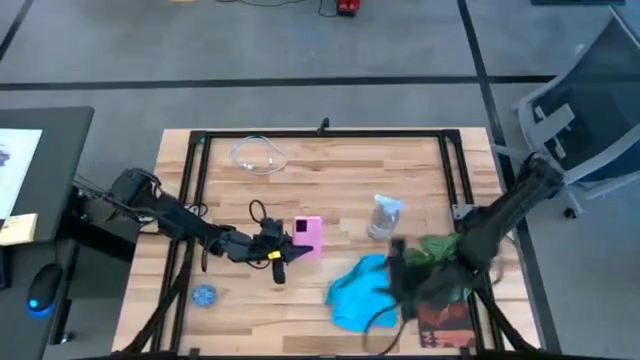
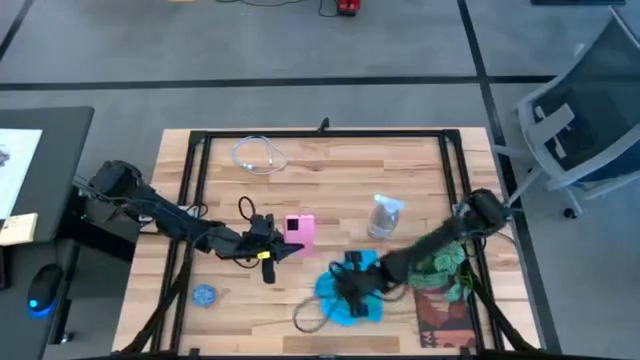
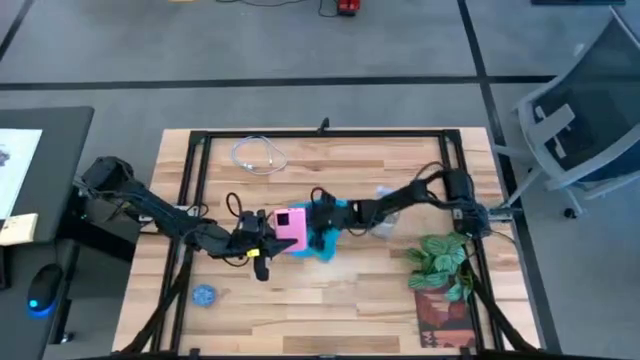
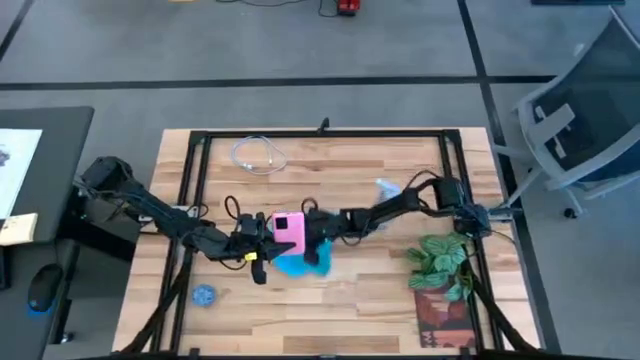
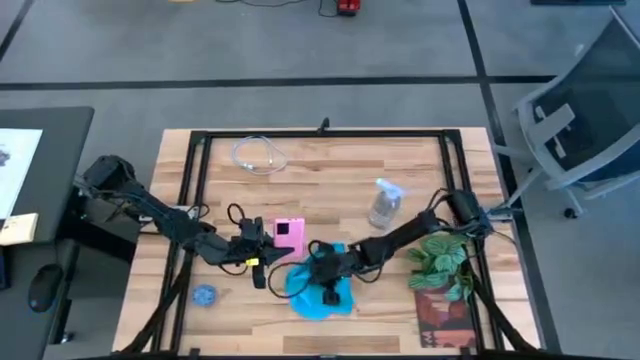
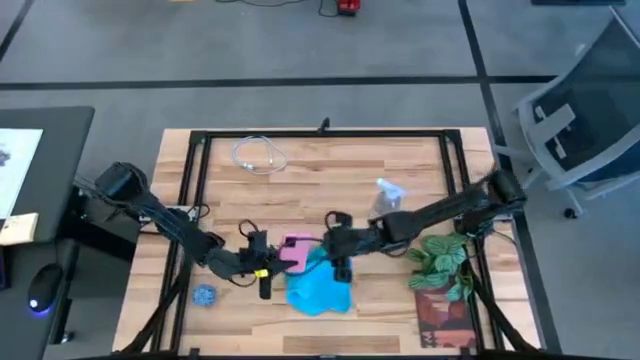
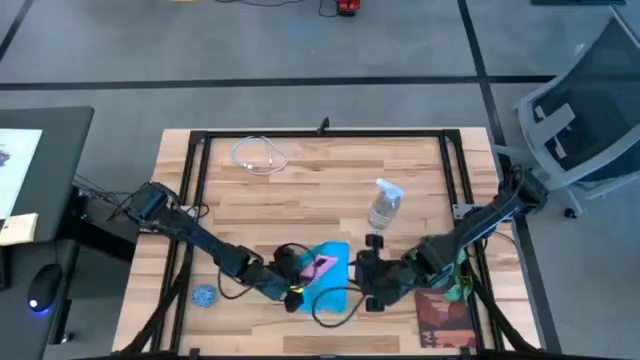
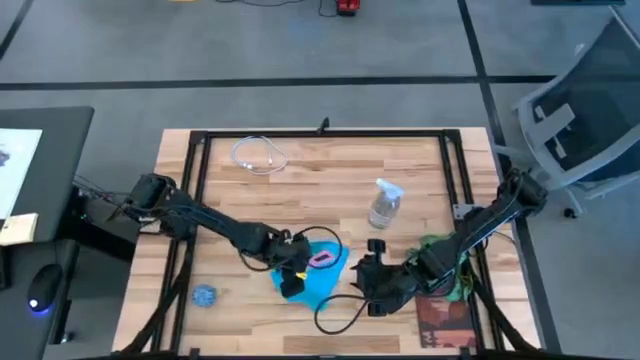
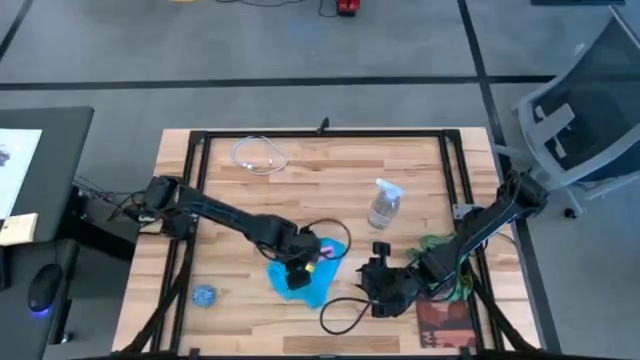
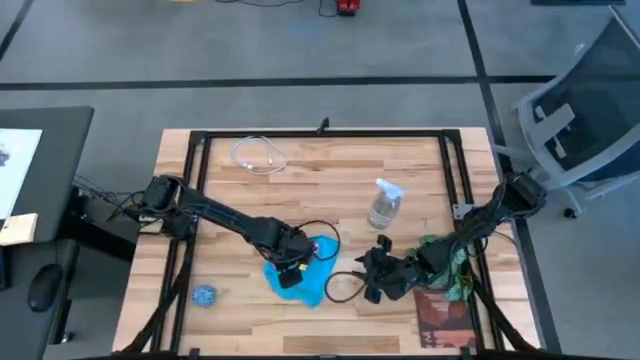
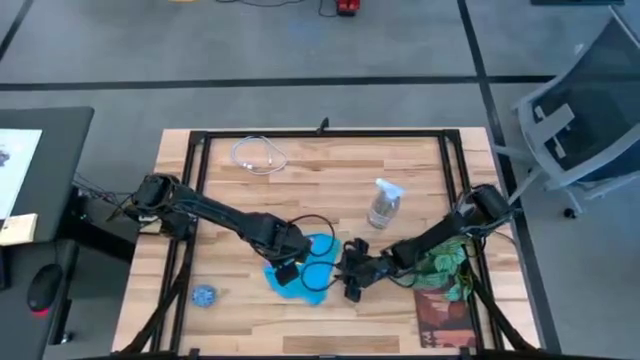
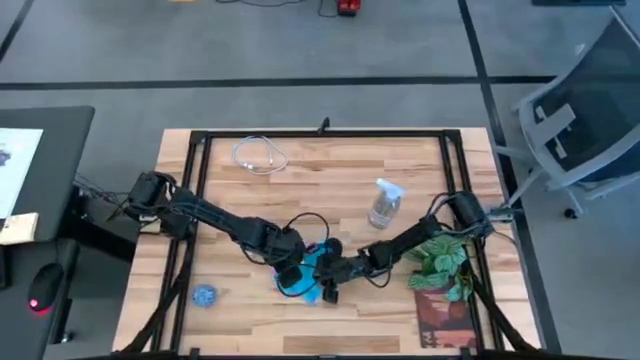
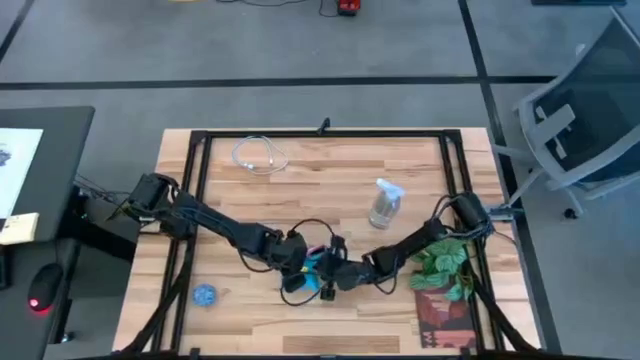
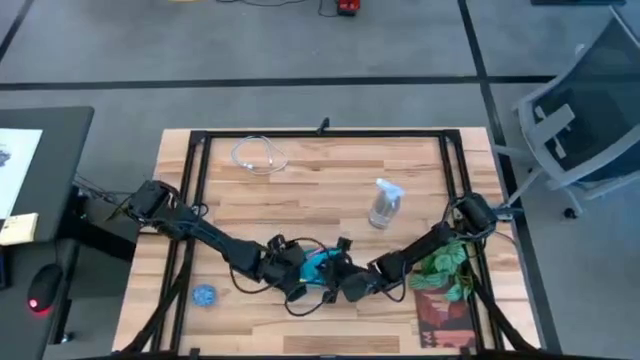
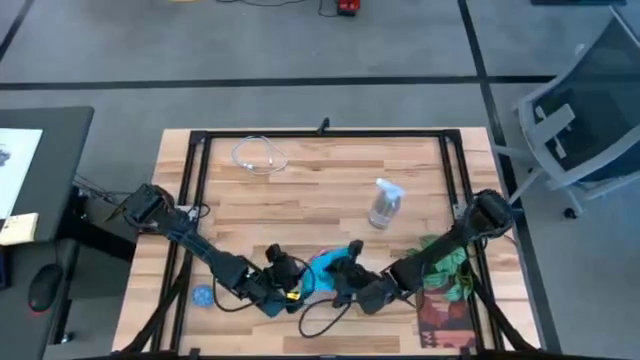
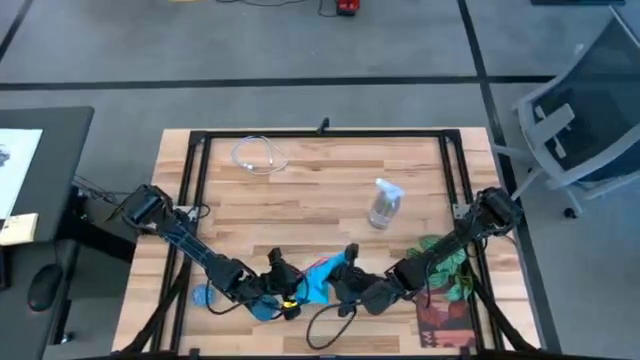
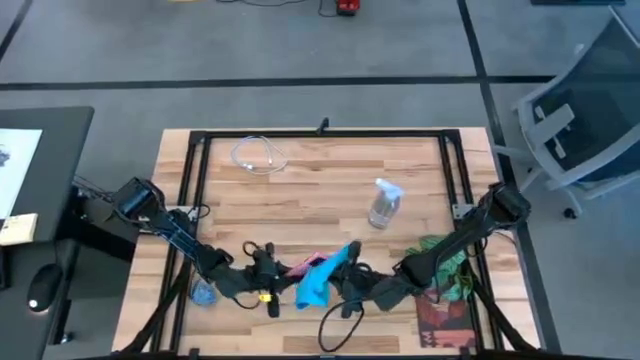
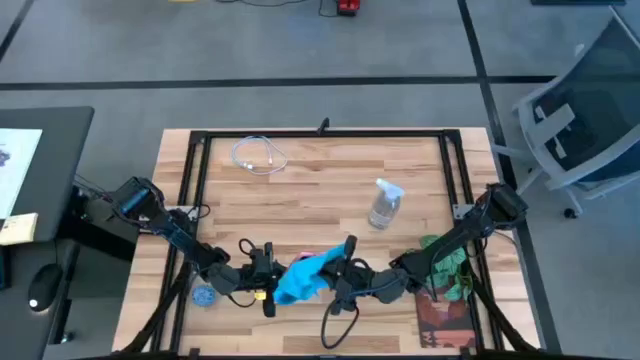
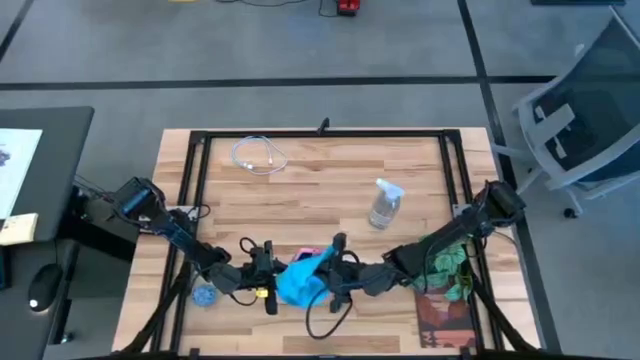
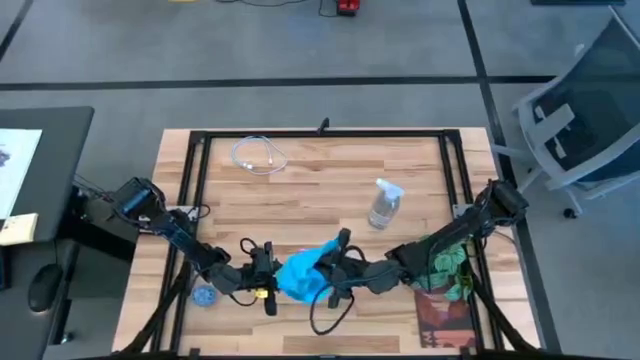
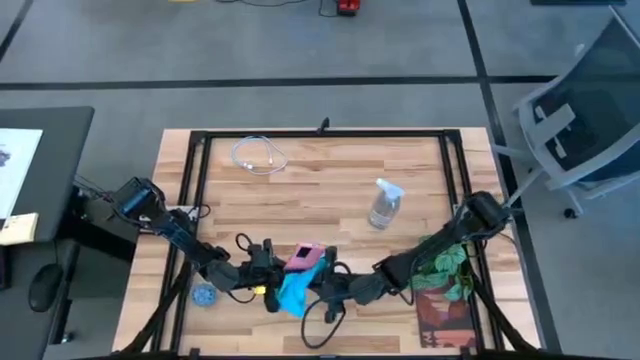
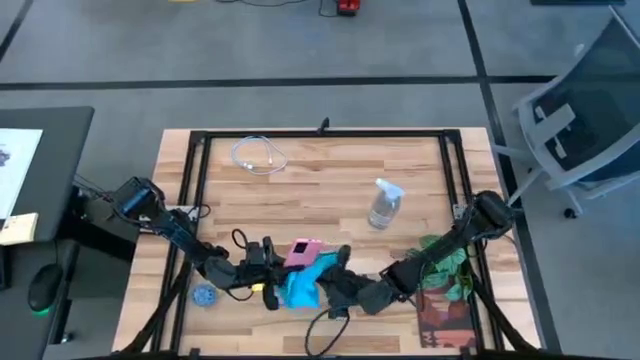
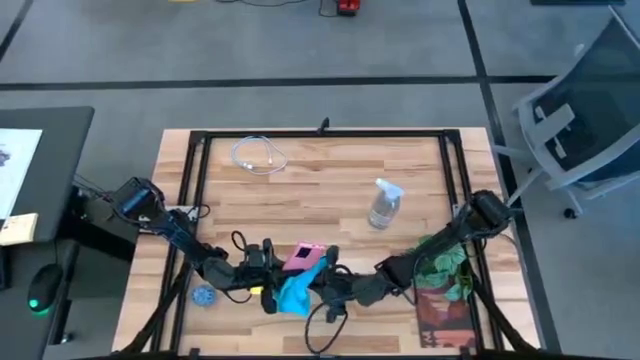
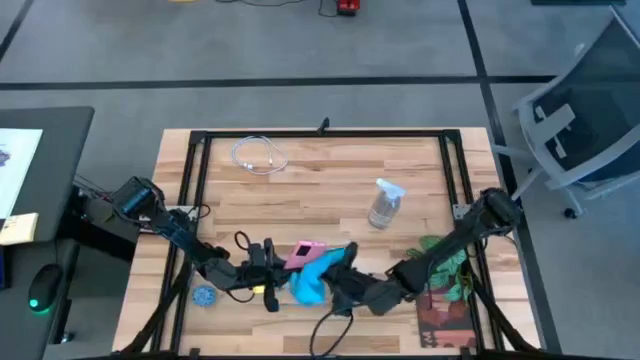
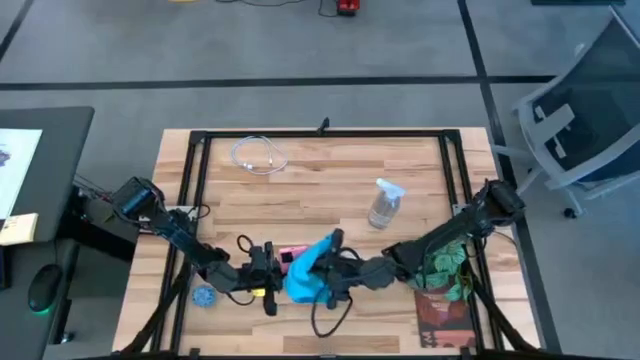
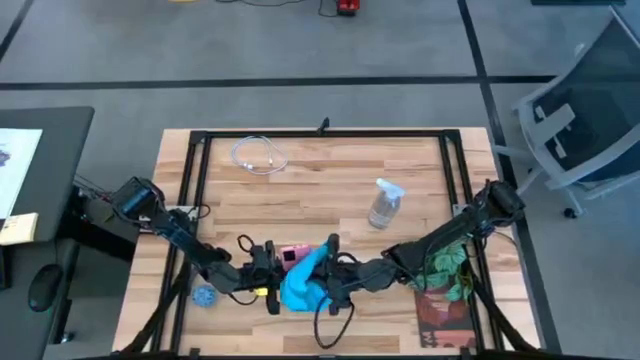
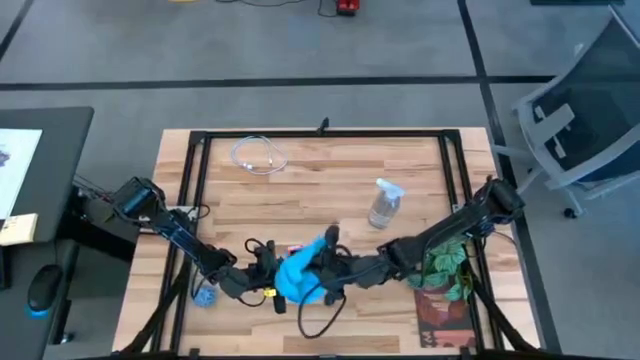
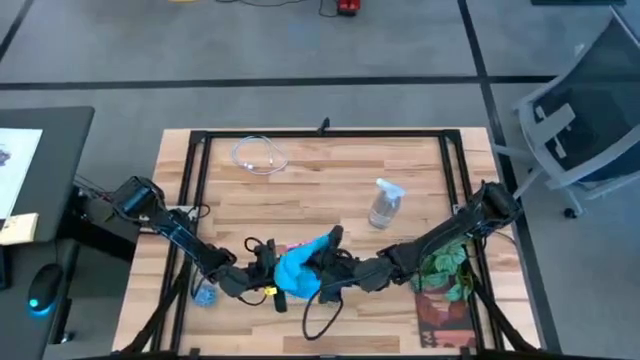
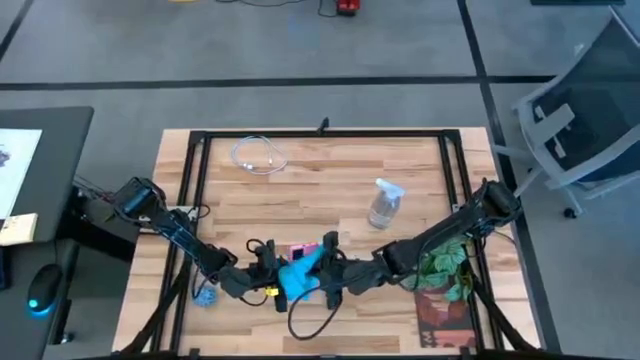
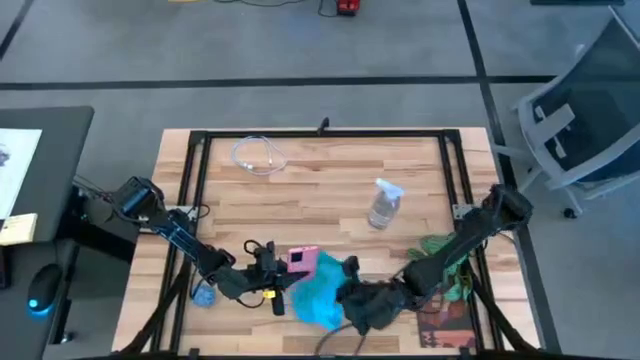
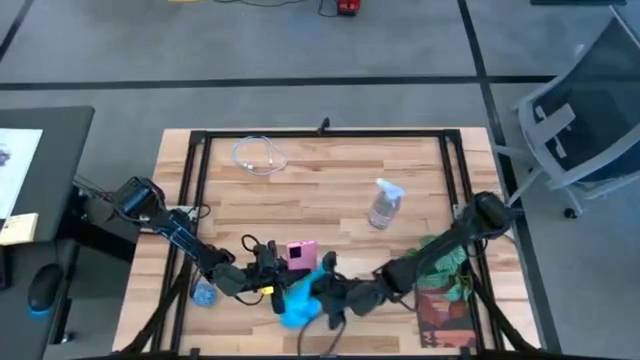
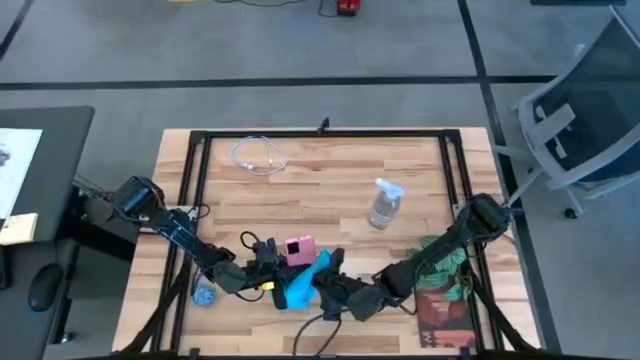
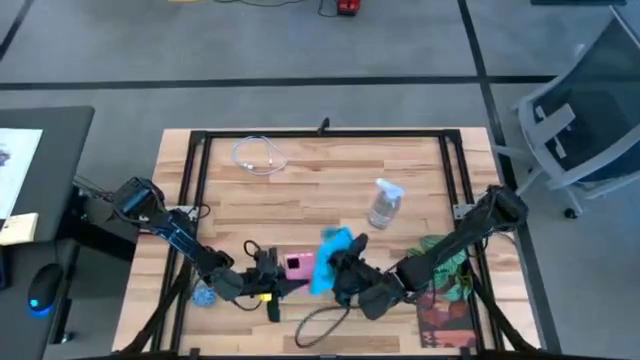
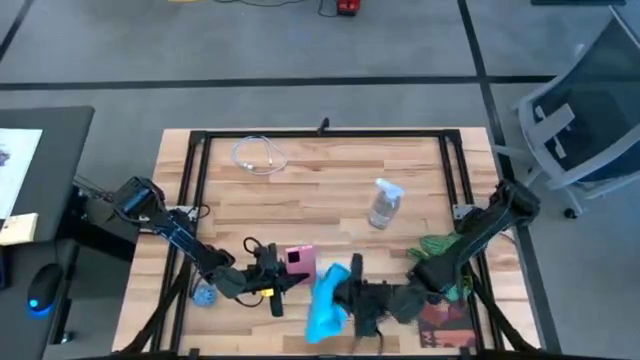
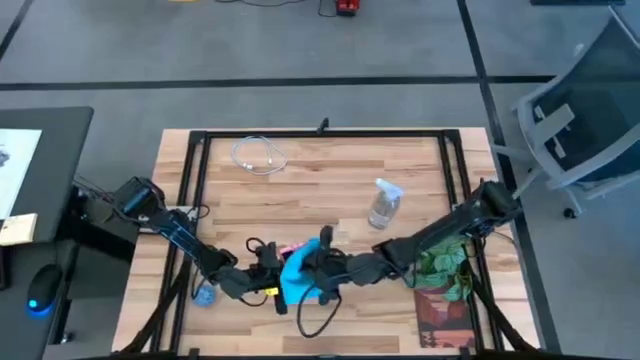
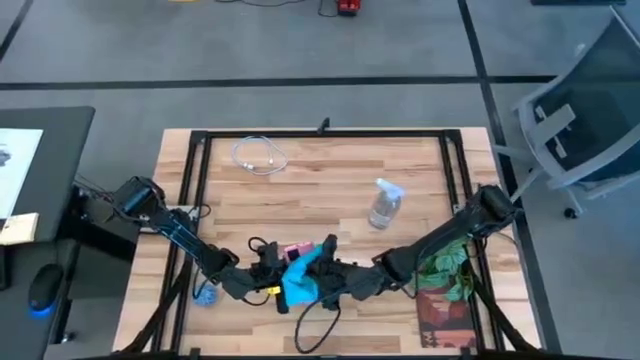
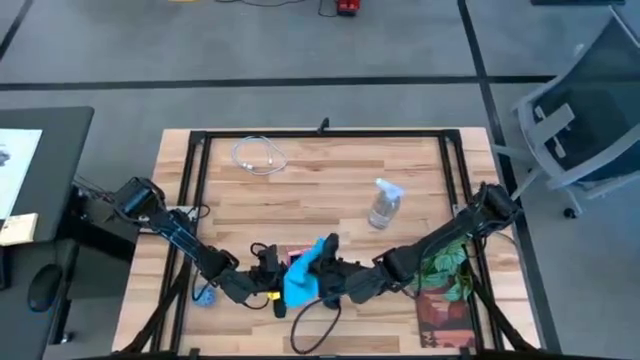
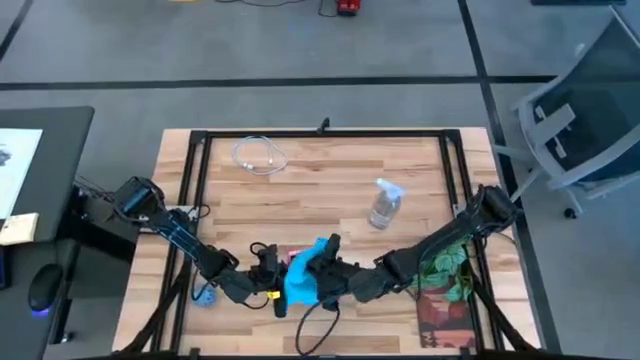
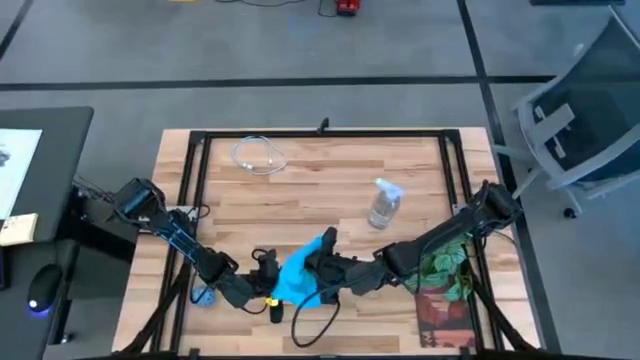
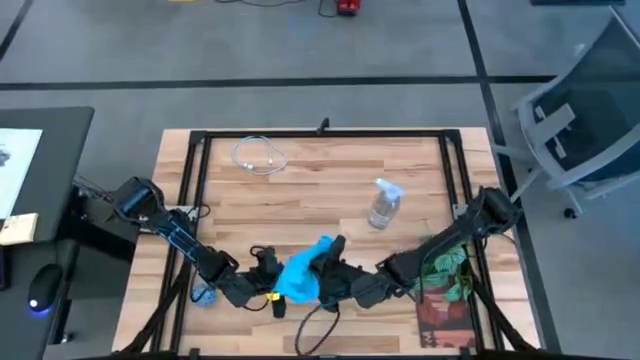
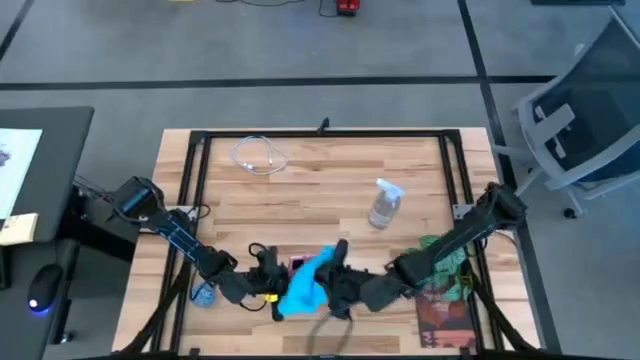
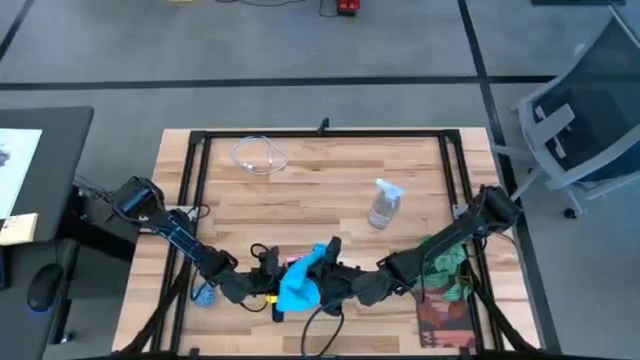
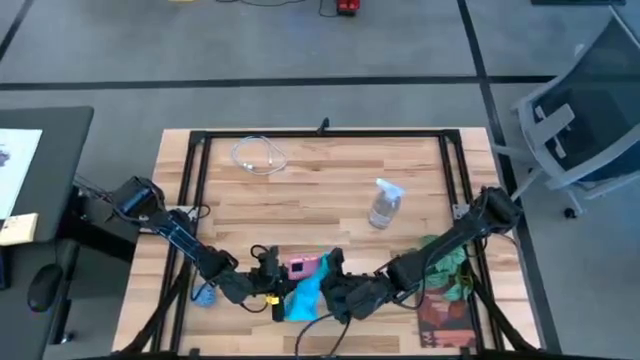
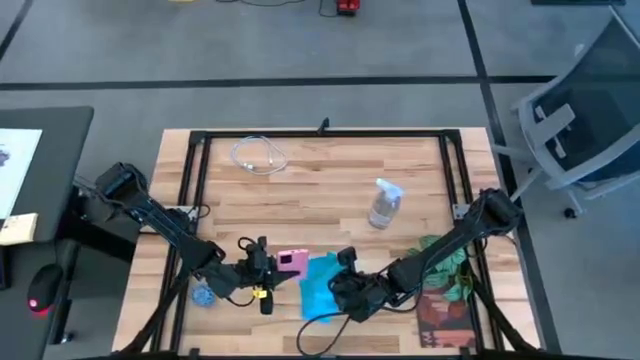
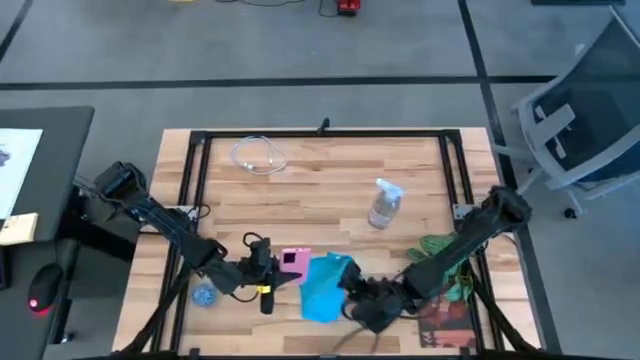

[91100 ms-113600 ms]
Task: Apply microfiber cloth
Wipe the back of the cellphone with a microfiber cloth
